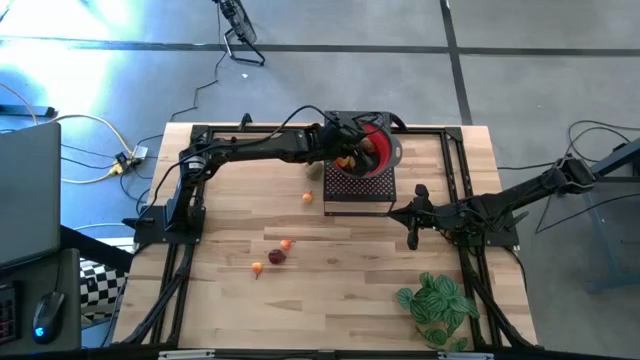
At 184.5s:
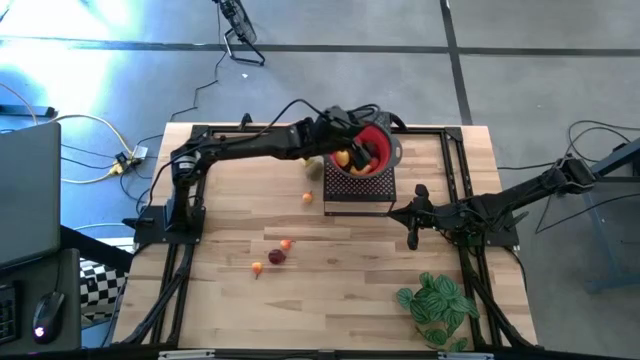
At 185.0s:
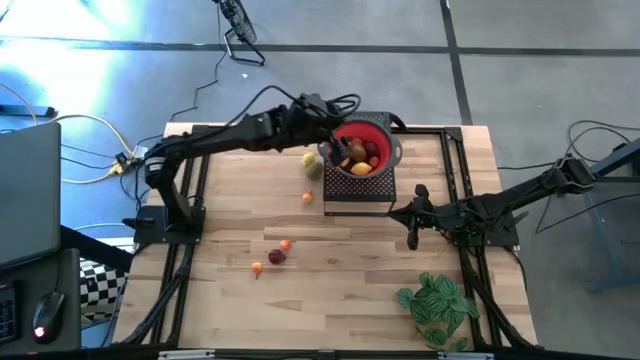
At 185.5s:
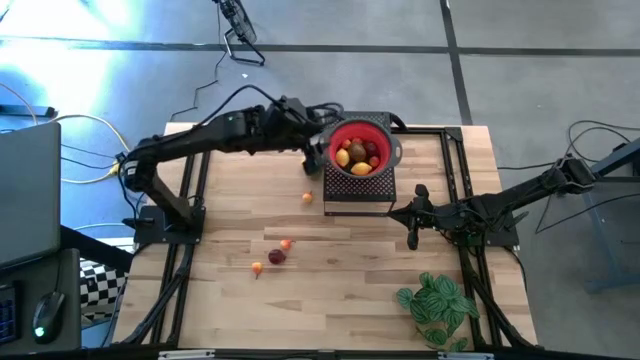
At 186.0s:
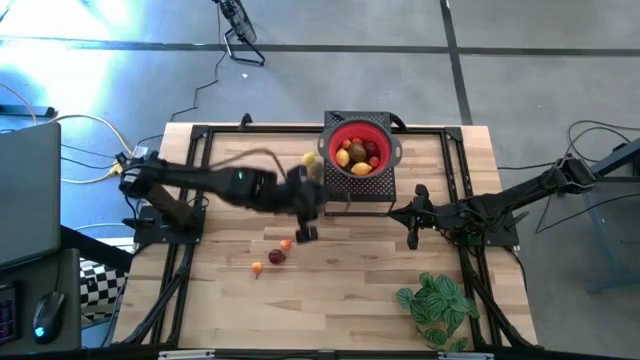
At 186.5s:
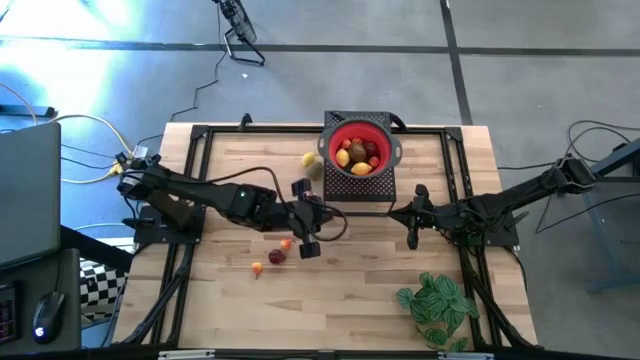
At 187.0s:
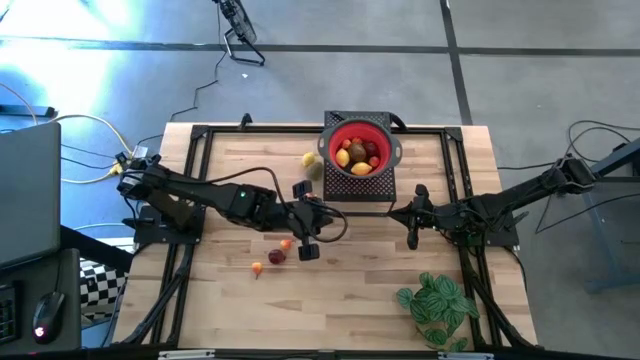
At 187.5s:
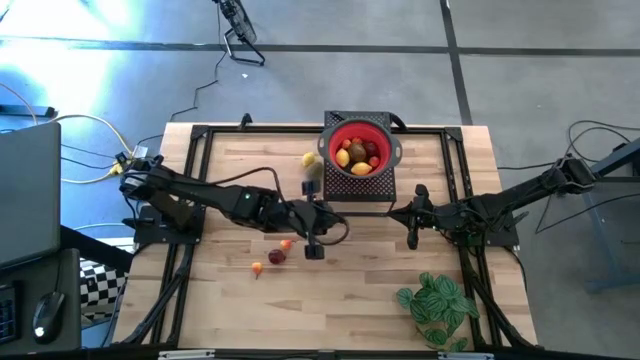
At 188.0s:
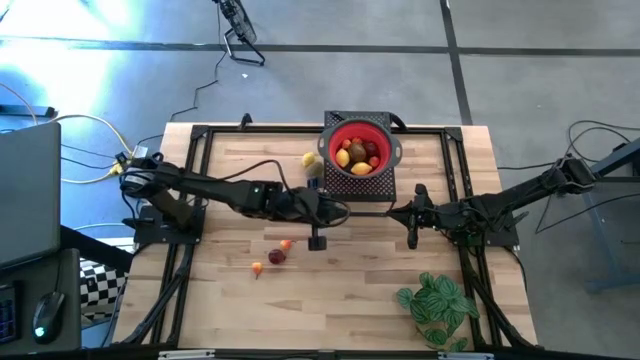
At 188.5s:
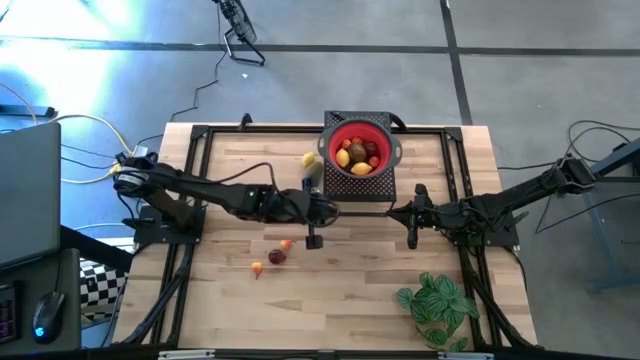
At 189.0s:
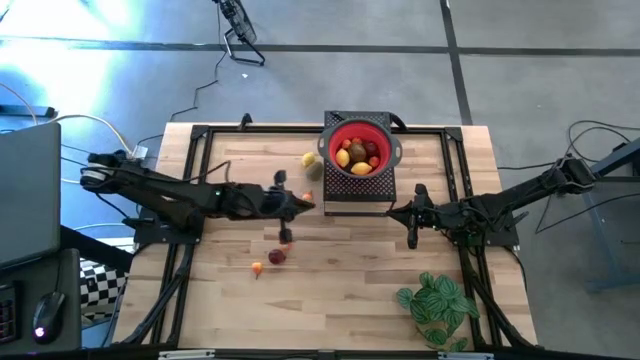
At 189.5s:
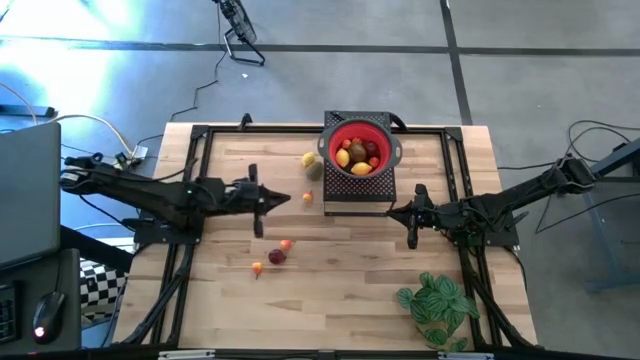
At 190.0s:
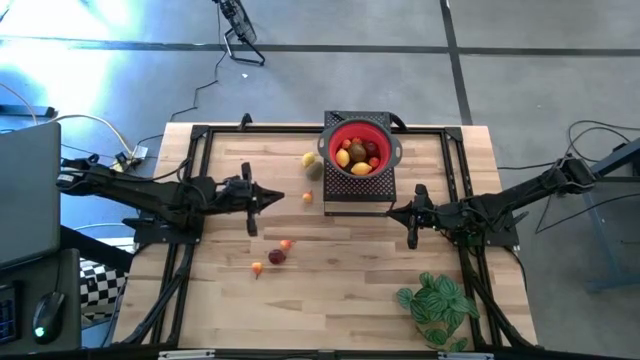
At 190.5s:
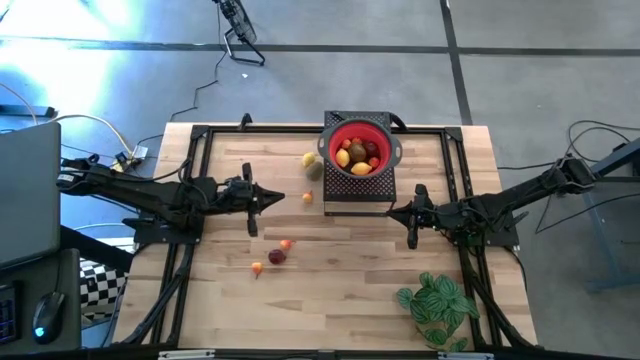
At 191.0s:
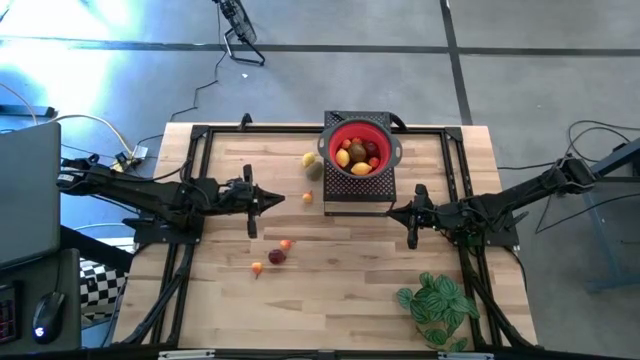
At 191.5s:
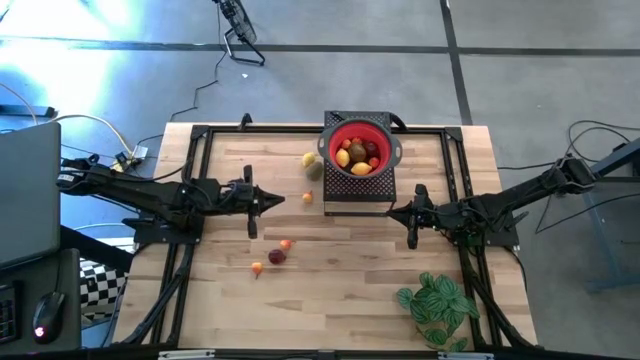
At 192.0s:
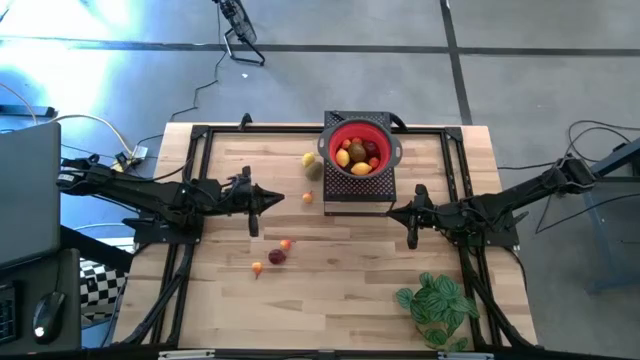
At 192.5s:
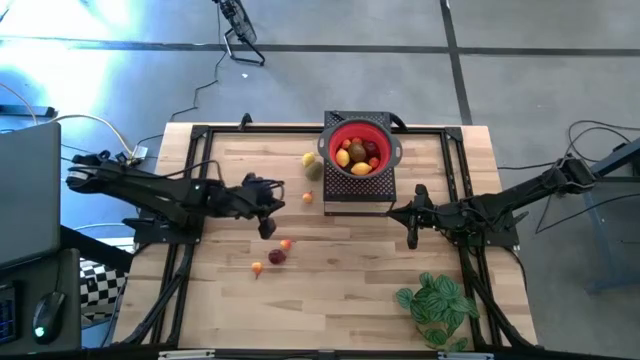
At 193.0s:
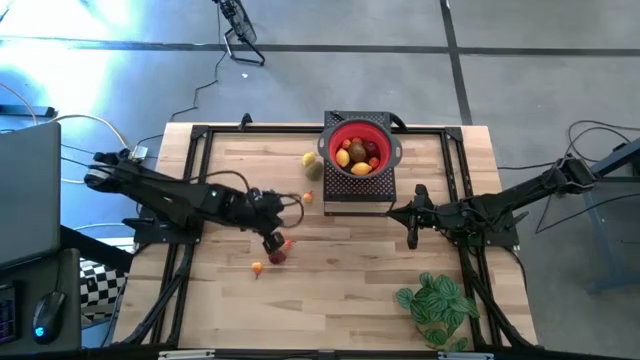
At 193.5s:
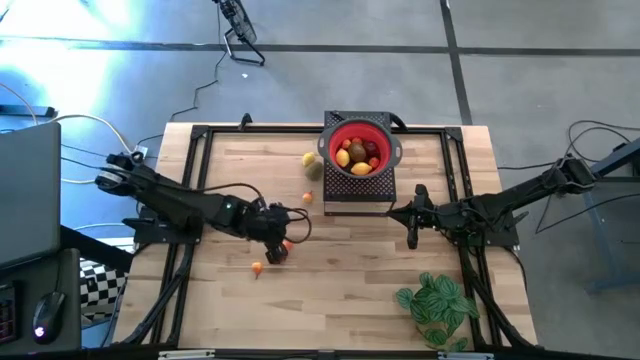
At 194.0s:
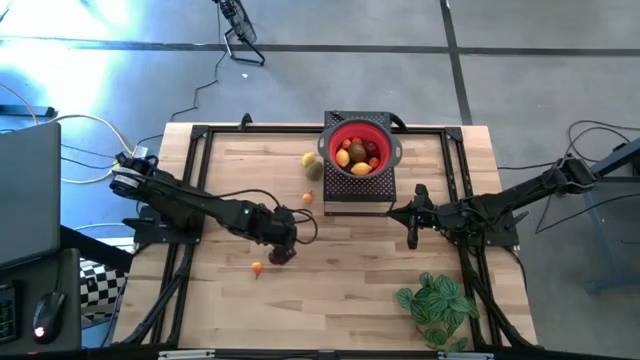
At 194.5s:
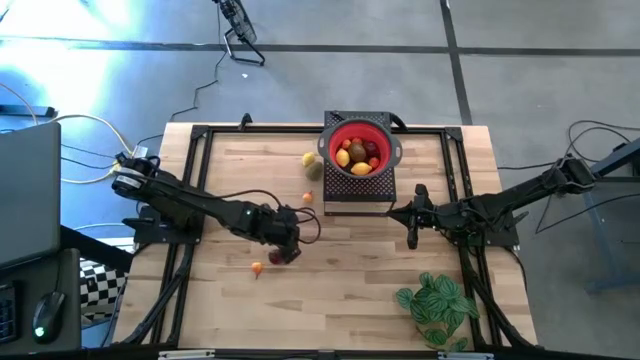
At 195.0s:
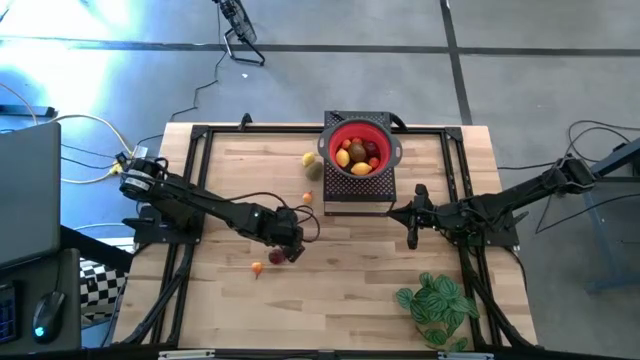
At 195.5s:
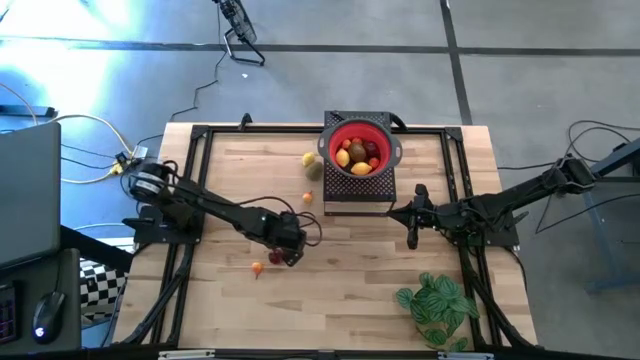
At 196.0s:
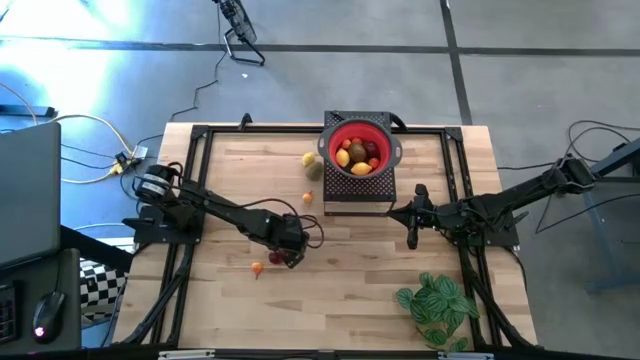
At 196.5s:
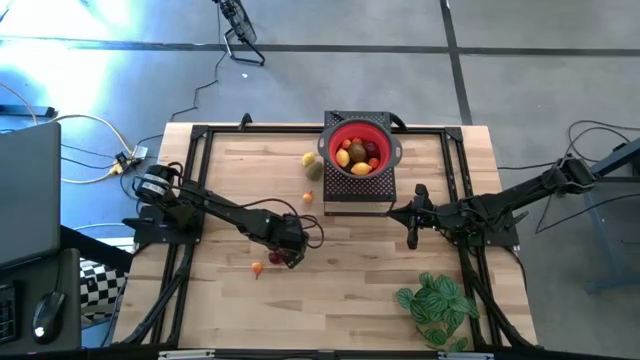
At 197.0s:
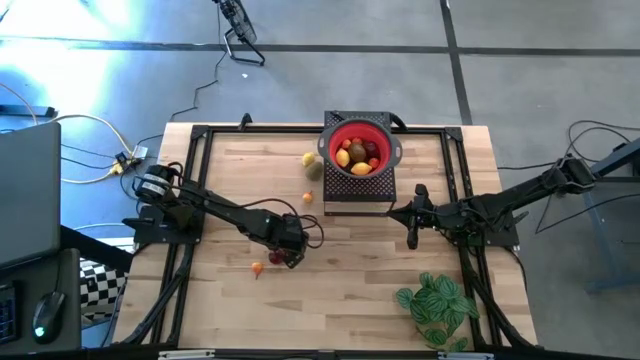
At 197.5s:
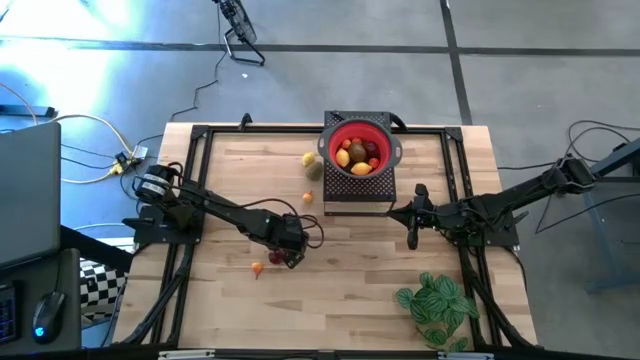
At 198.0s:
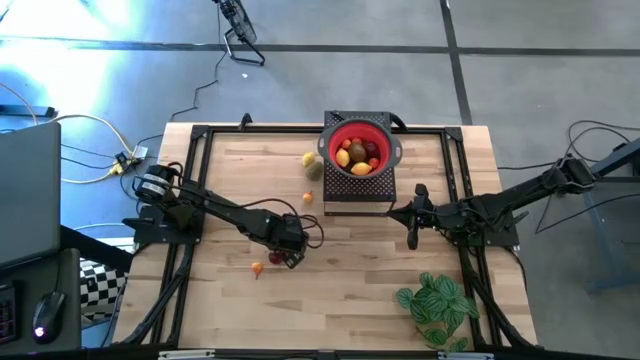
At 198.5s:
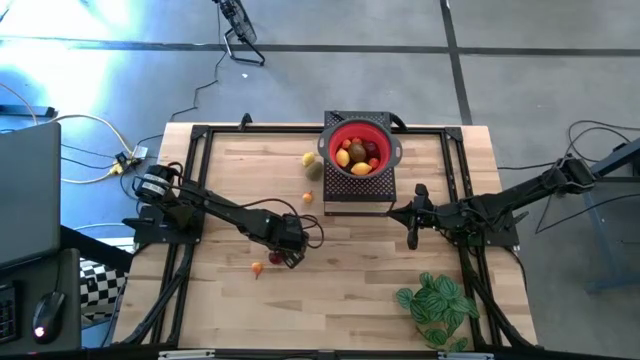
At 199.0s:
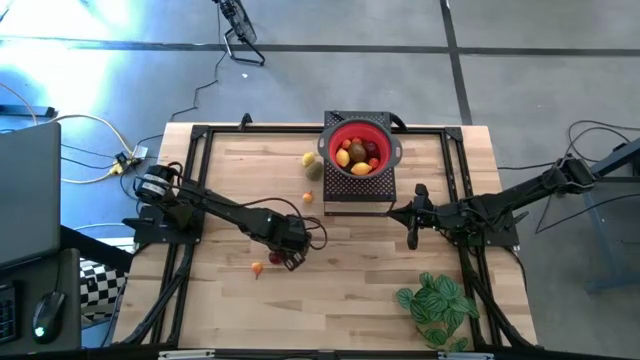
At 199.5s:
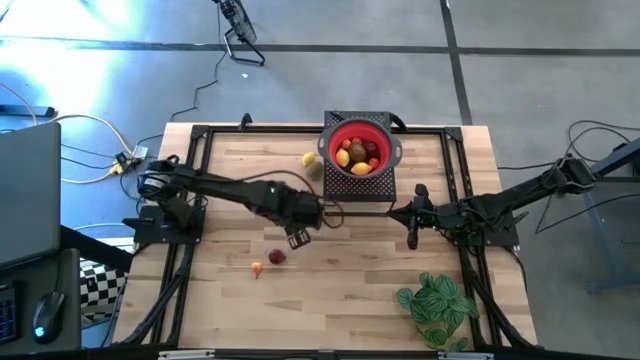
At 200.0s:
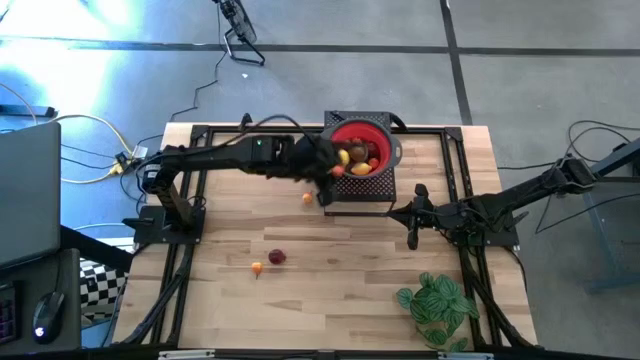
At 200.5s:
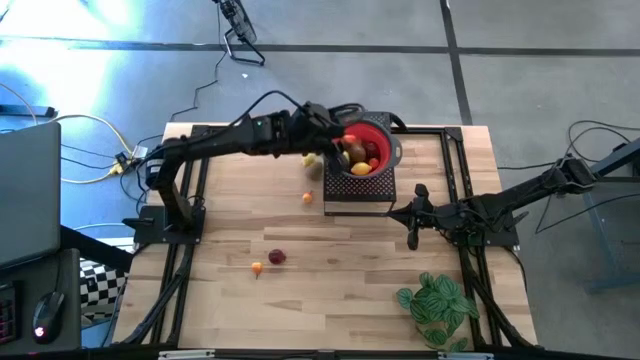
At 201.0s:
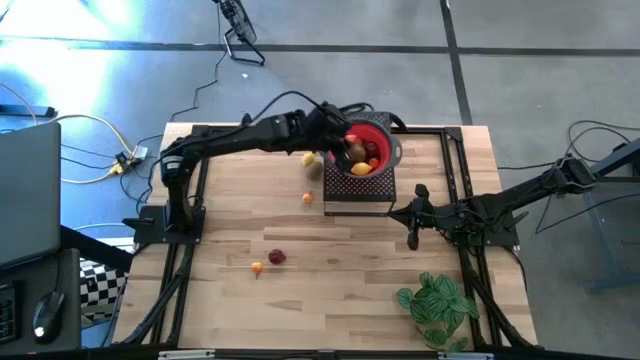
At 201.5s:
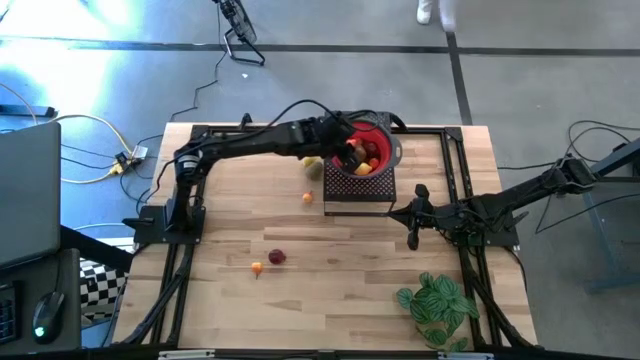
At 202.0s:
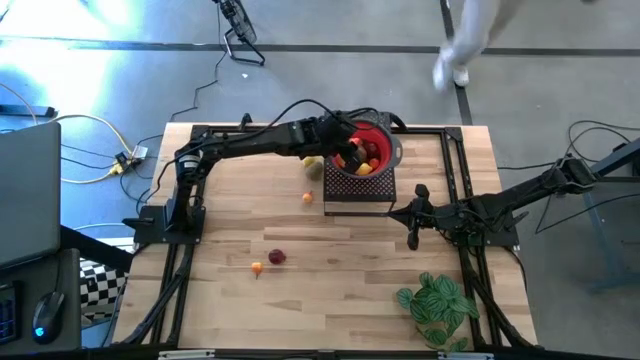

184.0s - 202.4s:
Task: Pick & Place Fruit
Put the orange pear into the red strainer bowl on the shelf

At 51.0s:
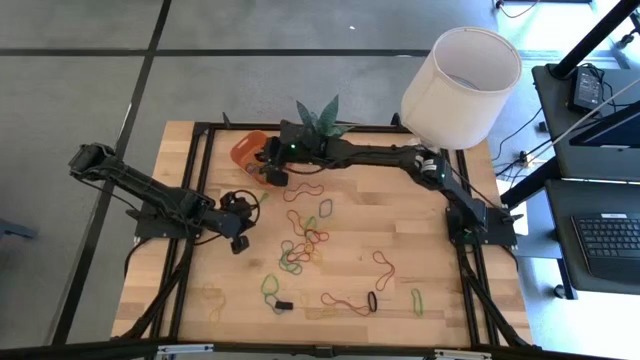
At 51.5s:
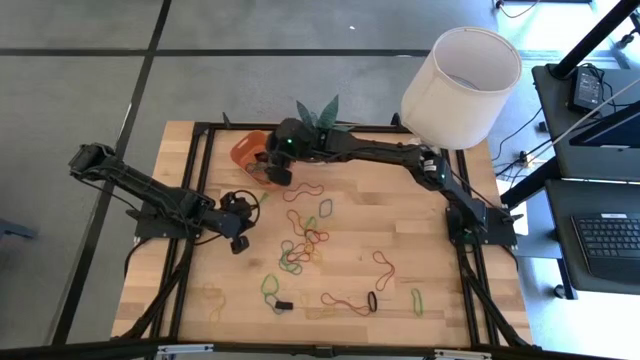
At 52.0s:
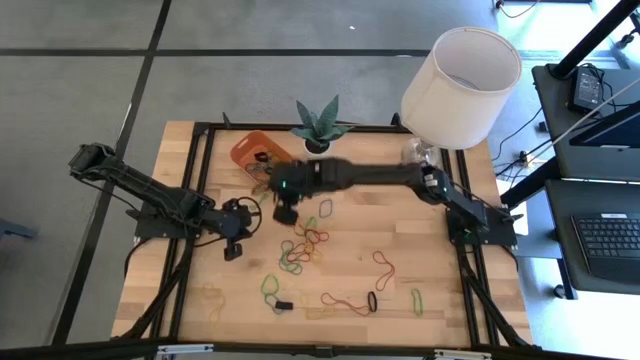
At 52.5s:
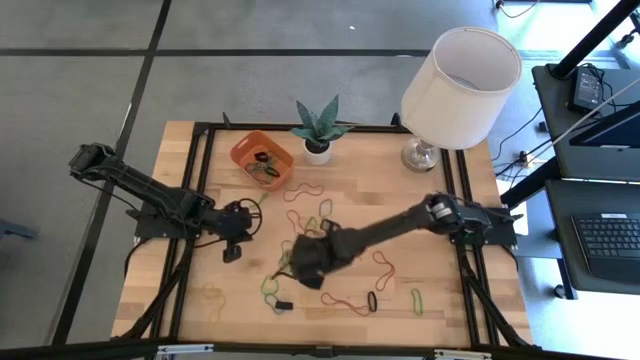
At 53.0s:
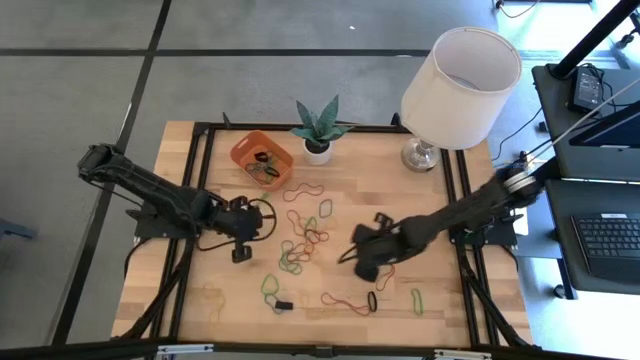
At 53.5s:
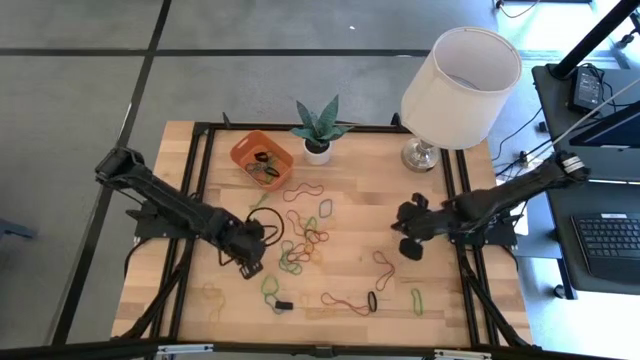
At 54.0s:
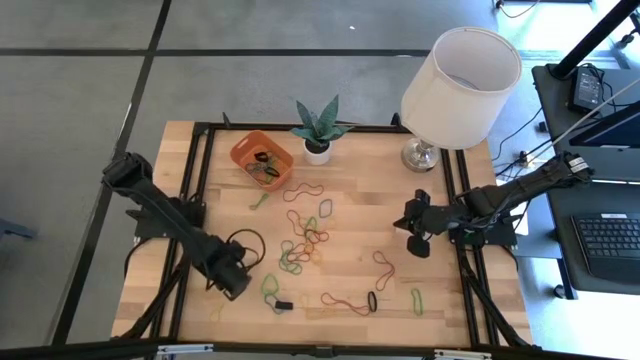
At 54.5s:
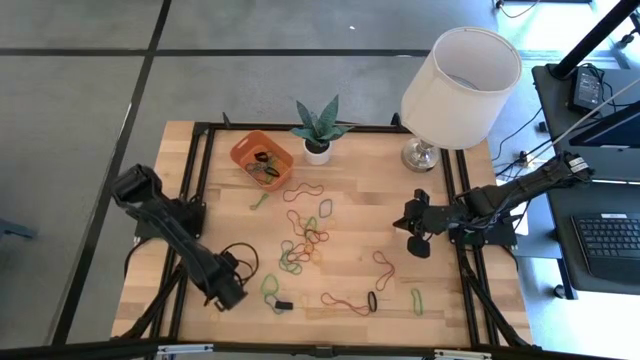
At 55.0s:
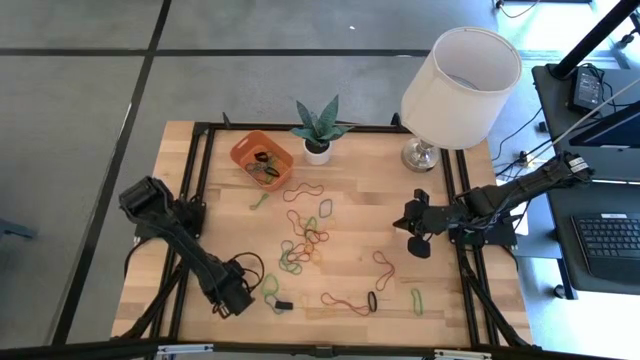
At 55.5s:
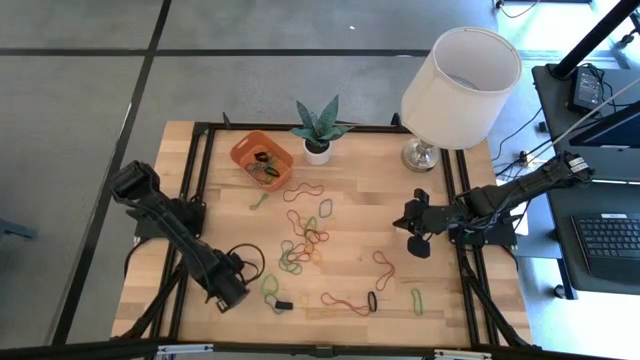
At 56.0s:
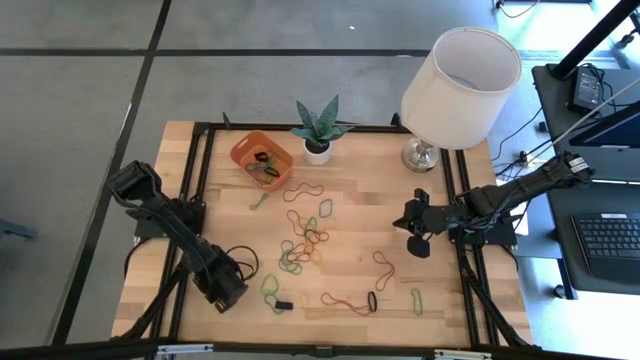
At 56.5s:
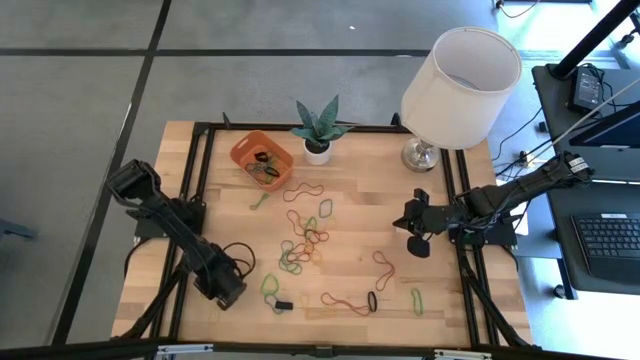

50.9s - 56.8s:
Task: Pick and place rubber bands into bin
Put the yellow rubber band into the orange bin
